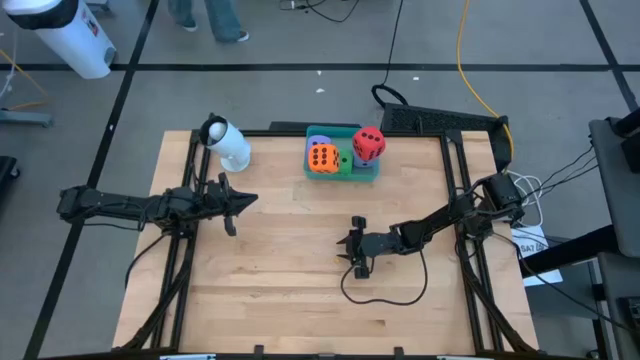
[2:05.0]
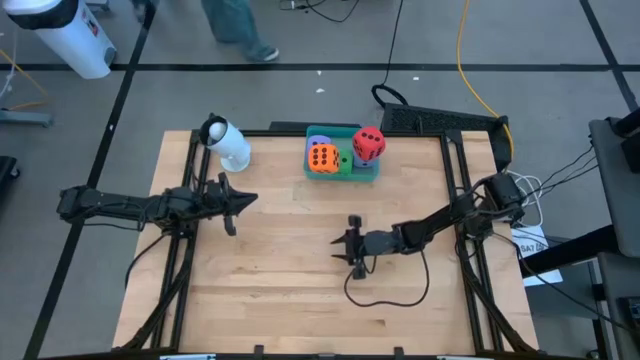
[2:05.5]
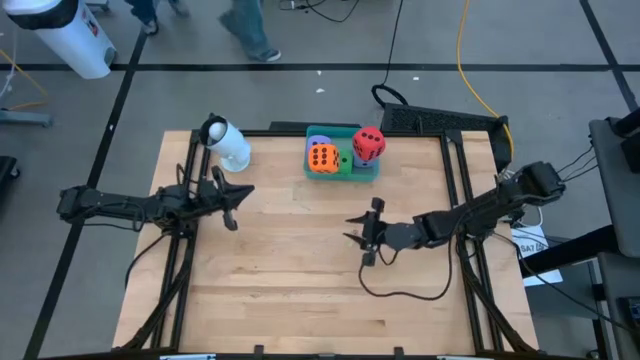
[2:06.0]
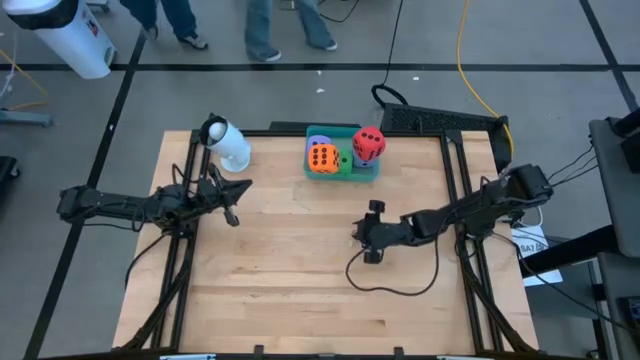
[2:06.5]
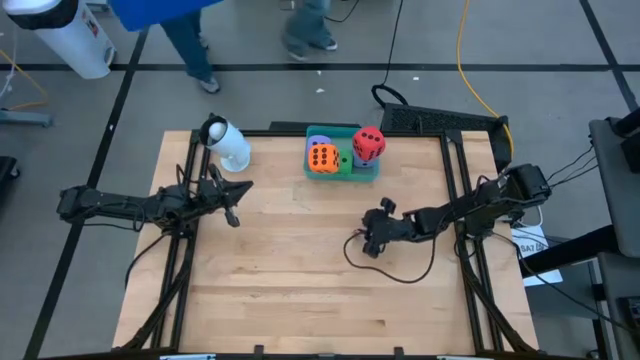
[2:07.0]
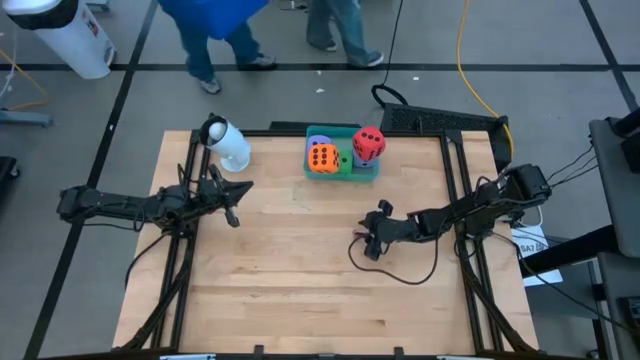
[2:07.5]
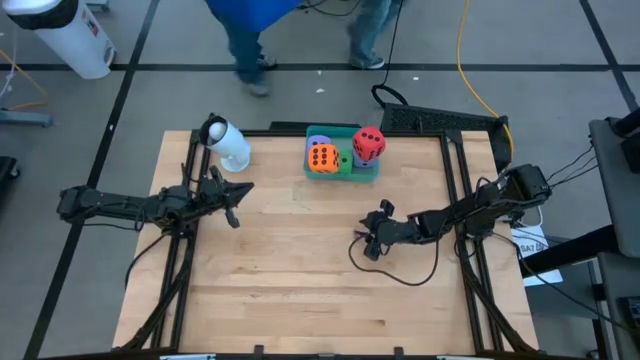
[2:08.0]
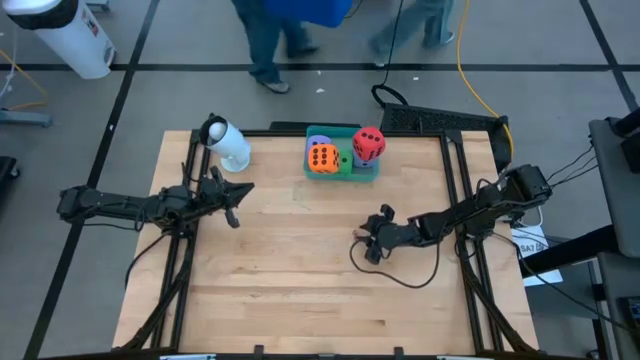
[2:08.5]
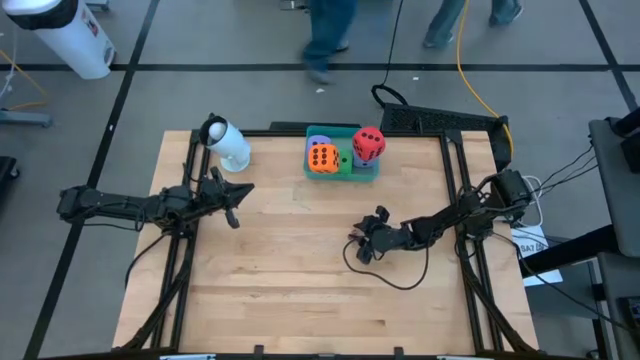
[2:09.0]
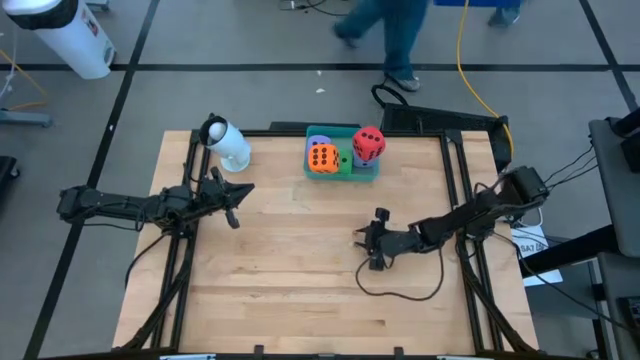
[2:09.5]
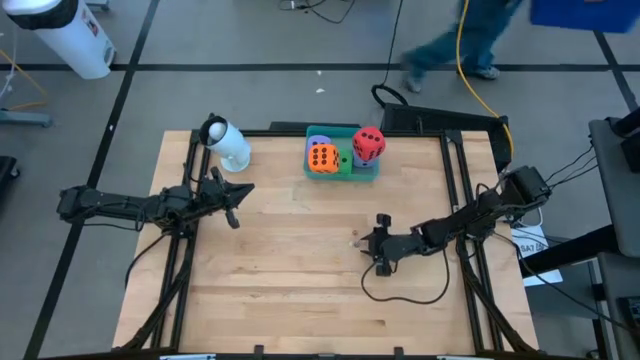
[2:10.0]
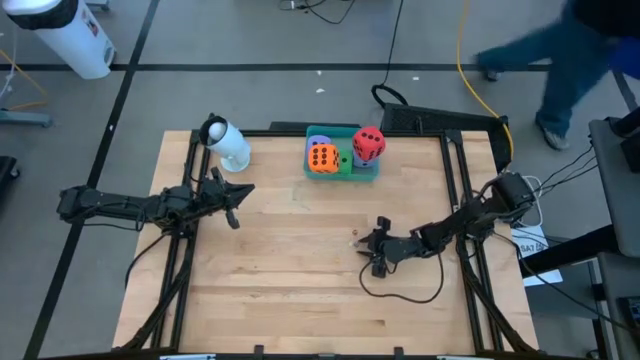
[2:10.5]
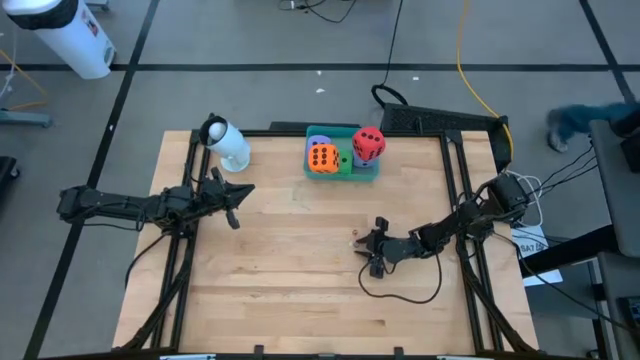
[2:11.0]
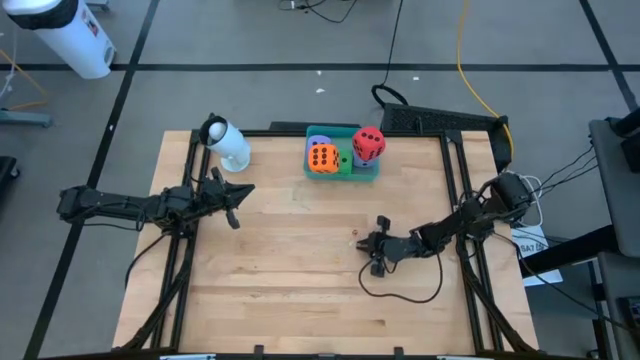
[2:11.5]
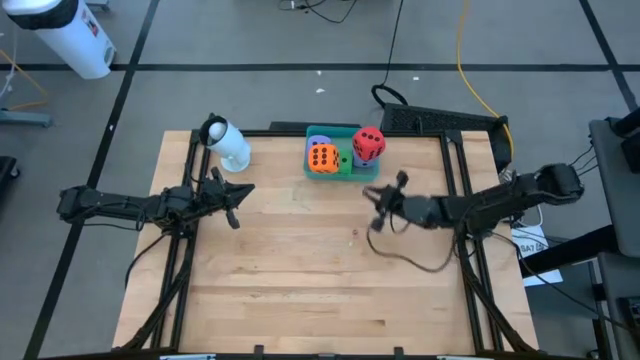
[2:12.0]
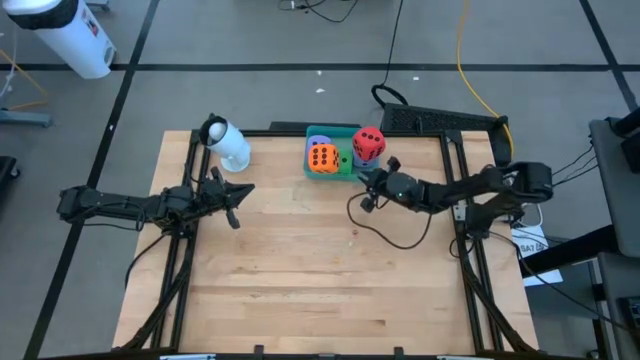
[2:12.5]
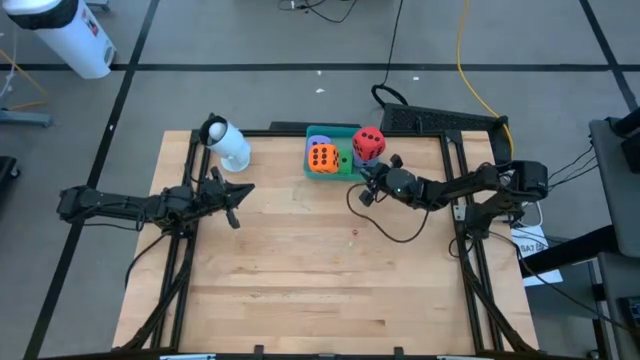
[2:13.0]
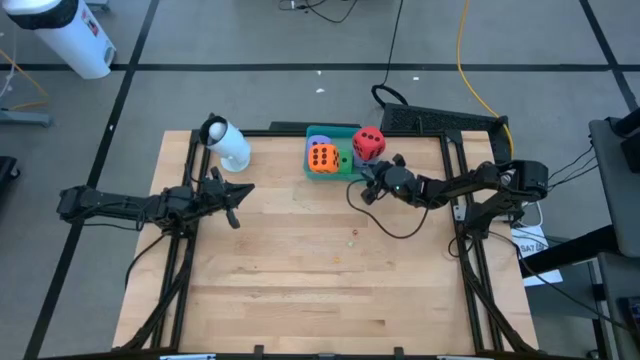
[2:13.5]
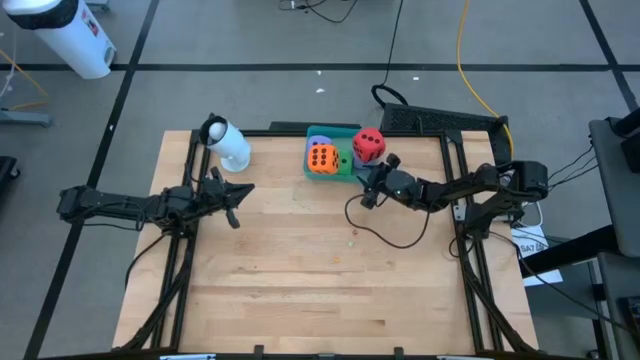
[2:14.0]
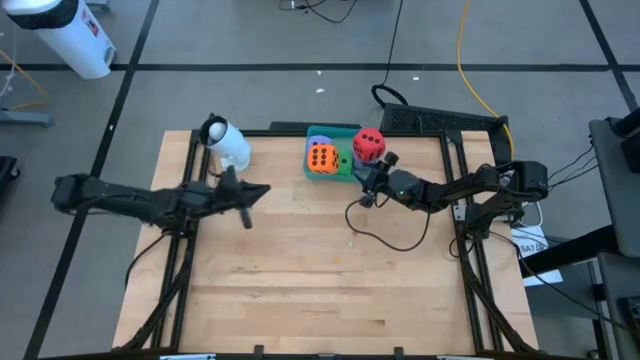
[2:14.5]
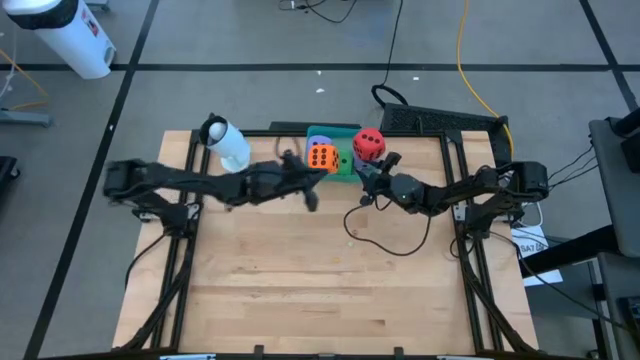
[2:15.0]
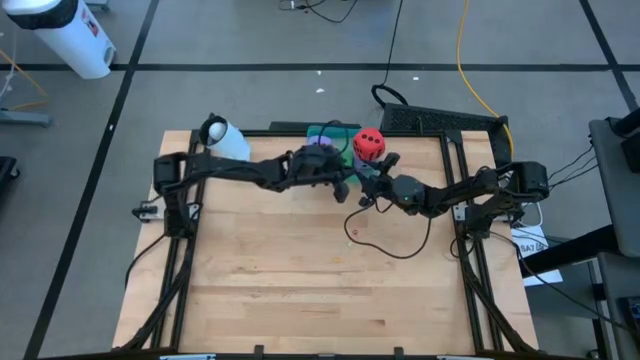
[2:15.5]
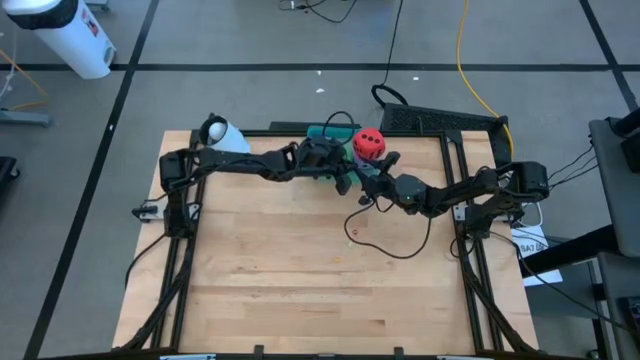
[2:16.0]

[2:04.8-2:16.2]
Task: Pick & Place Dice
Put the small purple dice into the green bin

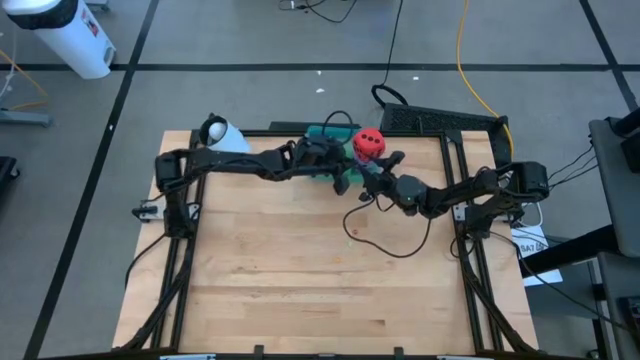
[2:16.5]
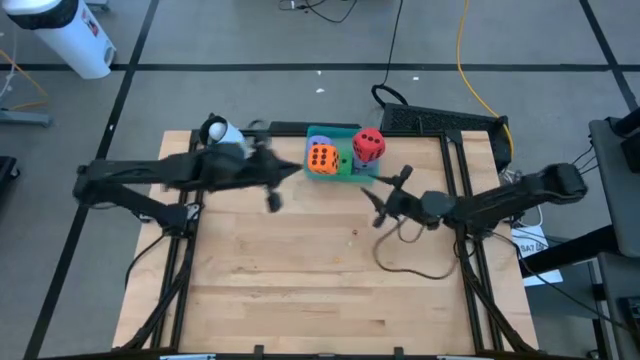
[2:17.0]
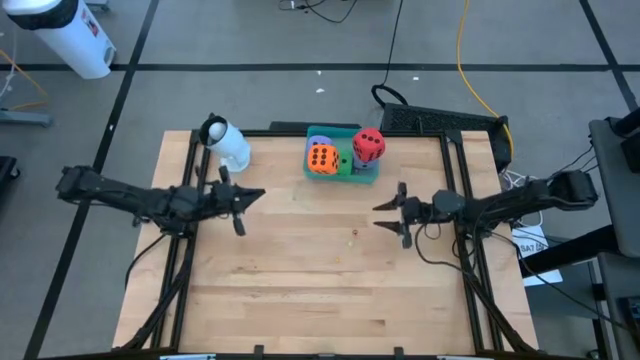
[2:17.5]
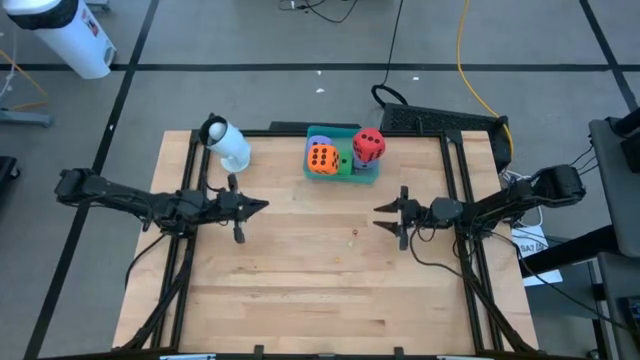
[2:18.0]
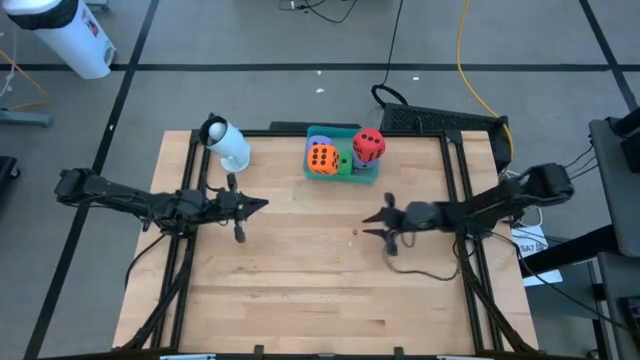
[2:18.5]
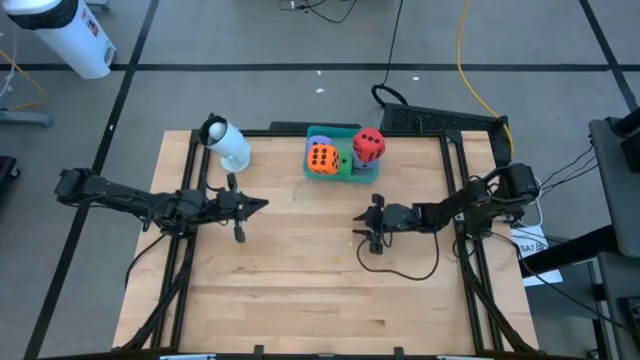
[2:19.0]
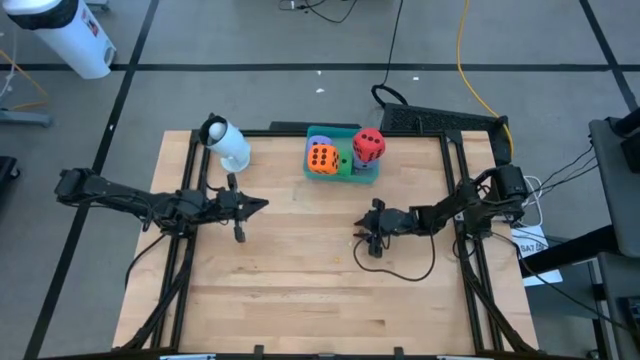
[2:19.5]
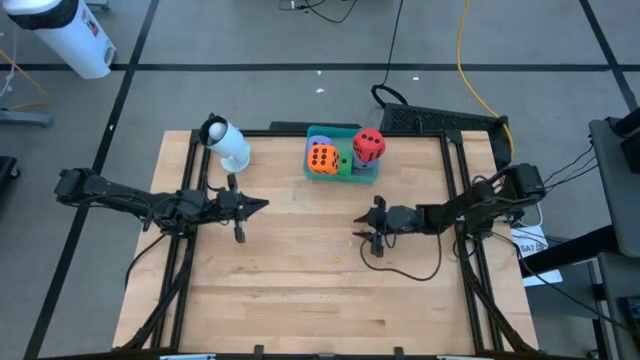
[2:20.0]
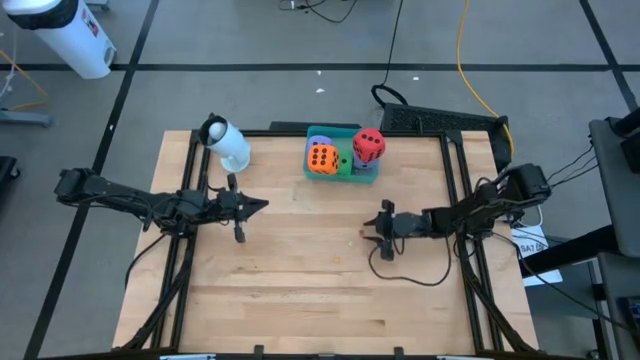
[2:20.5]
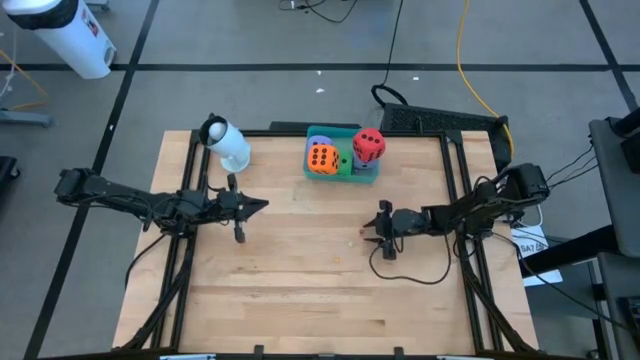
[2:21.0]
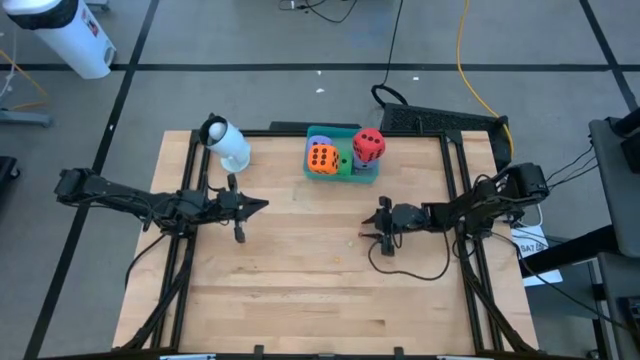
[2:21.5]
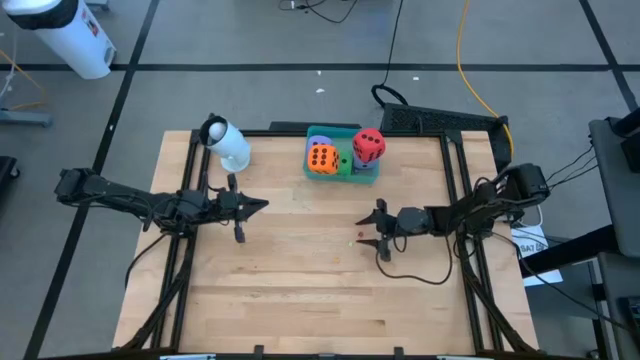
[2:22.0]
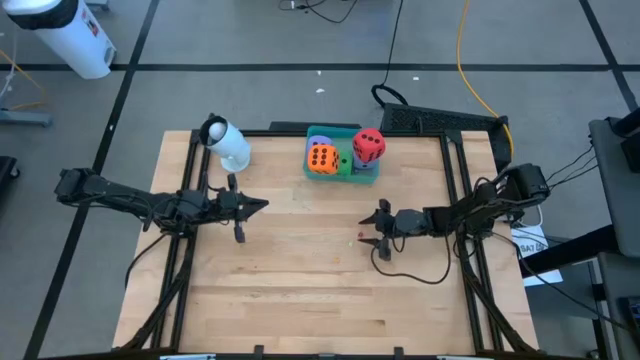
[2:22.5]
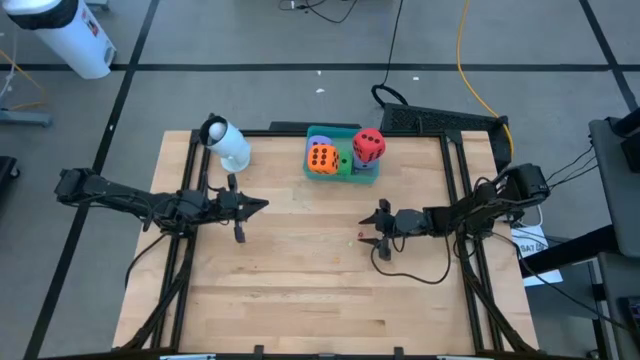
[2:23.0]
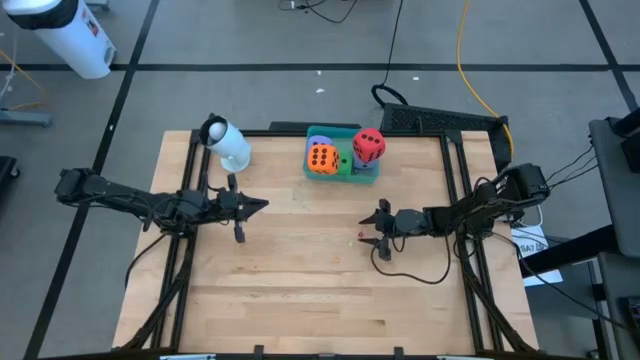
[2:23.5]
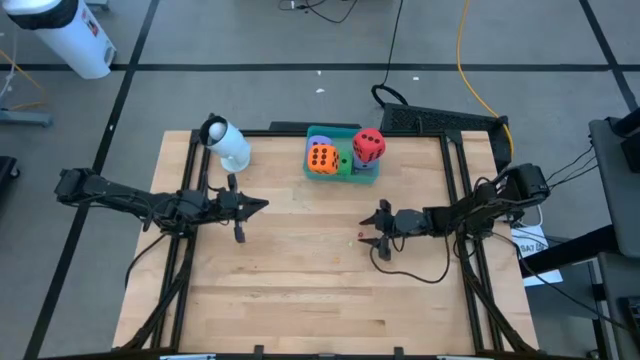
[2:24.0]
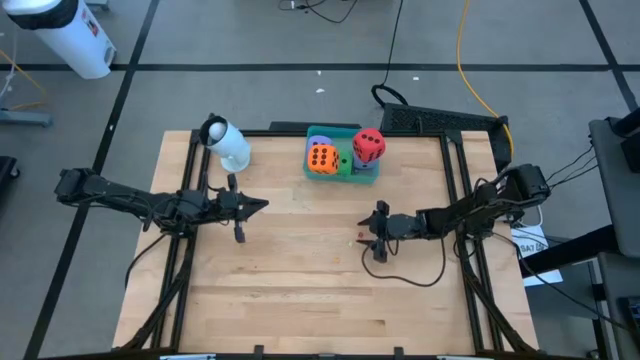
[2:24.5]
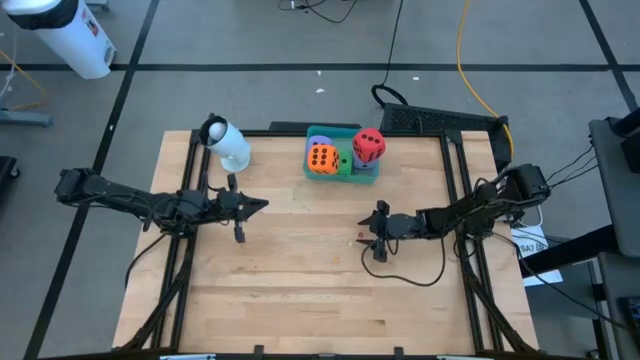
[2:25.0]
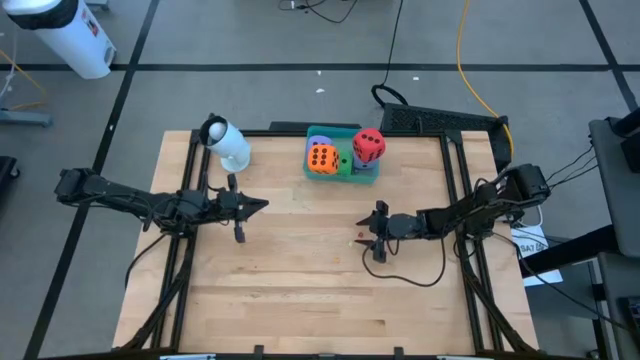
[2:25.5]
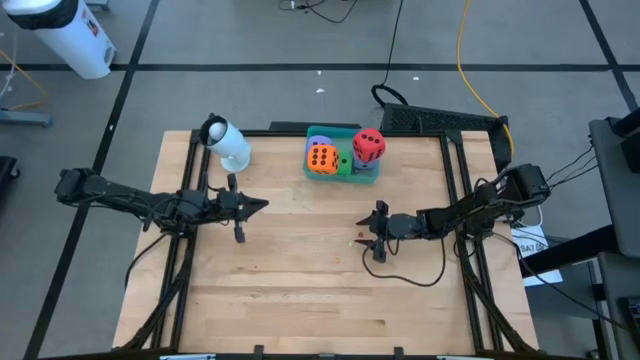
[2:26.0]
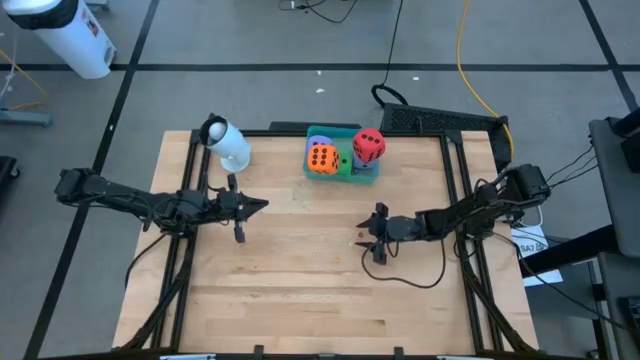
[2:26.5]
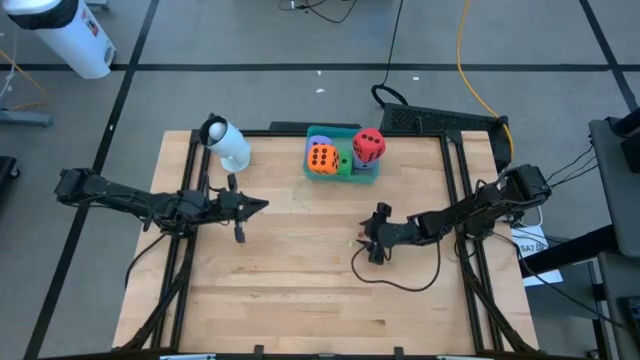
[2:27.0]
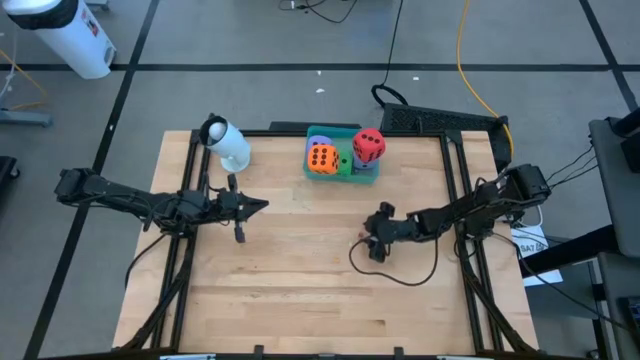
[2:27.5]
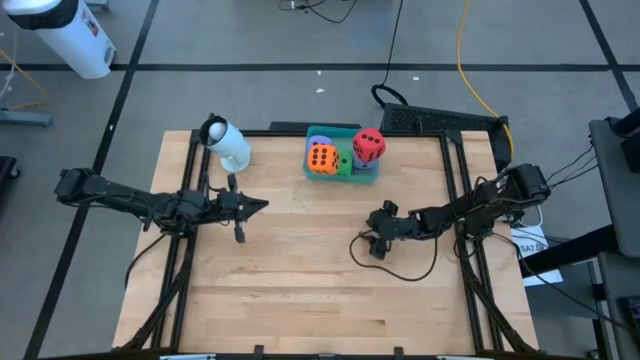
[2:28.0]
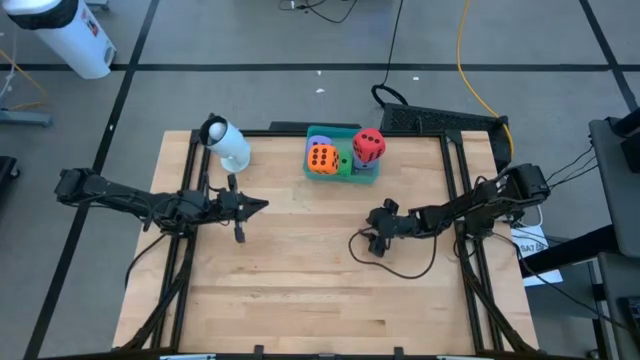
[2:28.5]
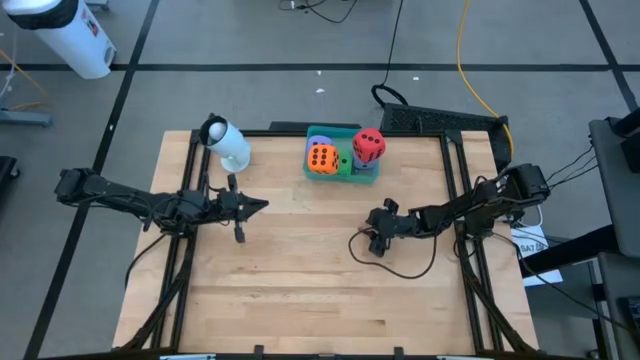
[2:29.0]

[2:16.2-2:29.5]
Put the small red dice into the green bin
